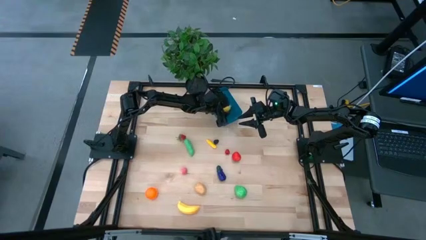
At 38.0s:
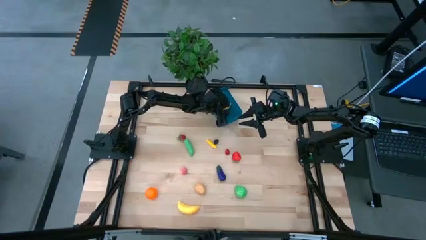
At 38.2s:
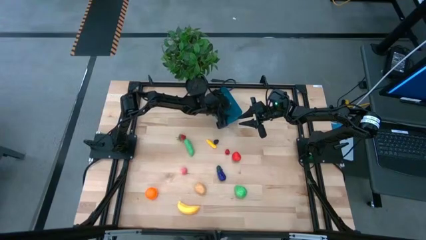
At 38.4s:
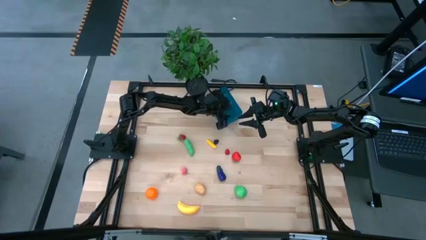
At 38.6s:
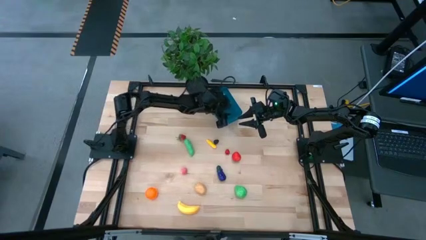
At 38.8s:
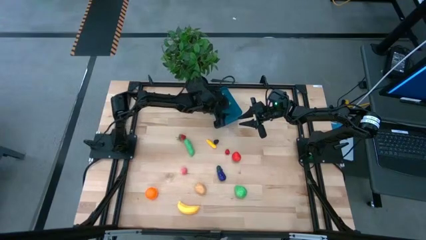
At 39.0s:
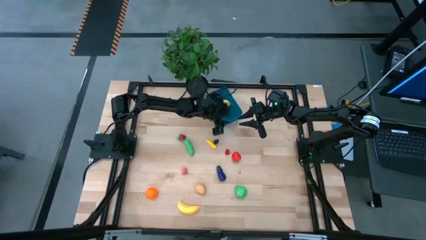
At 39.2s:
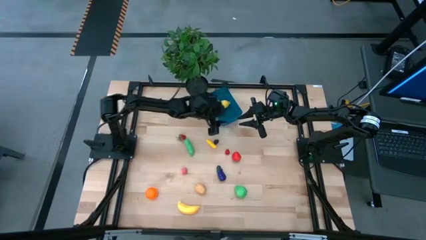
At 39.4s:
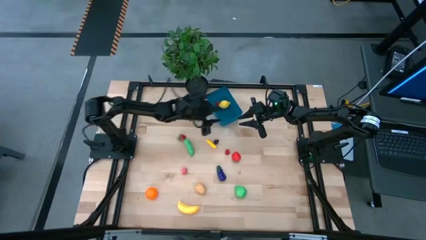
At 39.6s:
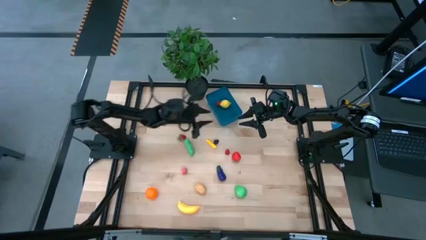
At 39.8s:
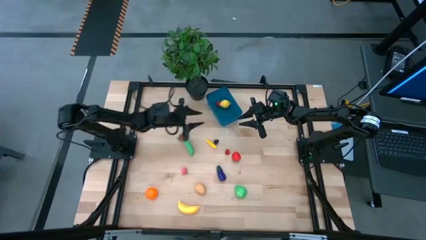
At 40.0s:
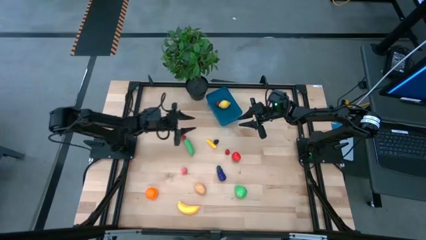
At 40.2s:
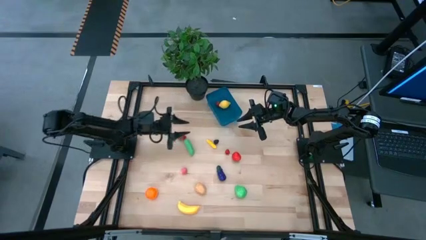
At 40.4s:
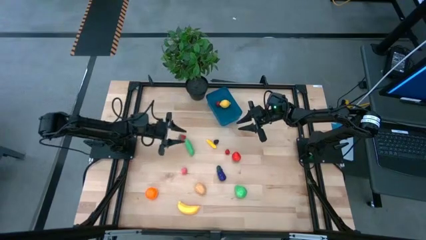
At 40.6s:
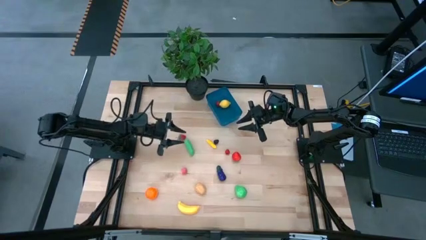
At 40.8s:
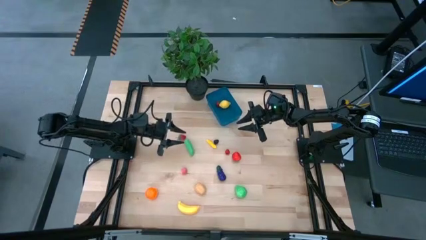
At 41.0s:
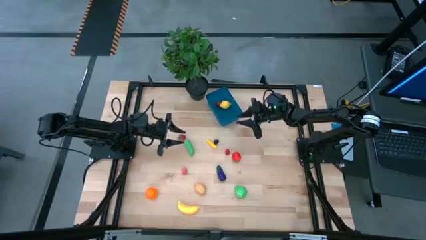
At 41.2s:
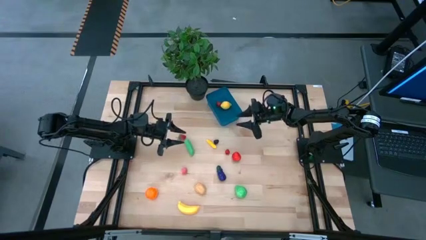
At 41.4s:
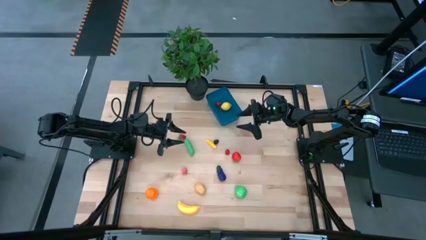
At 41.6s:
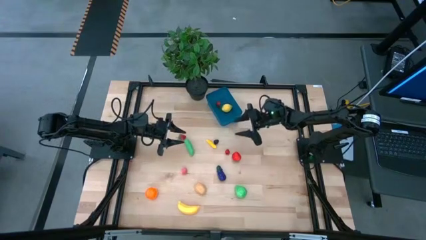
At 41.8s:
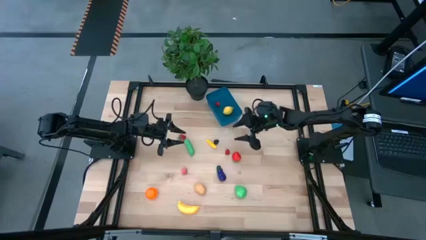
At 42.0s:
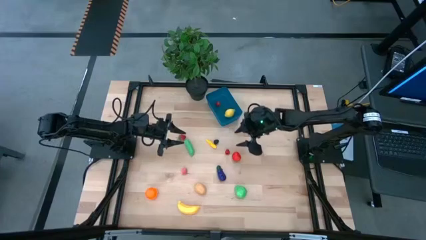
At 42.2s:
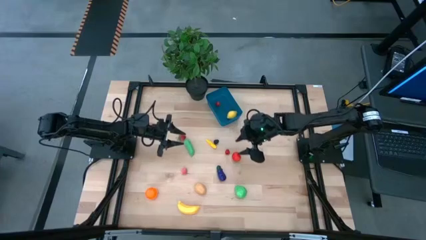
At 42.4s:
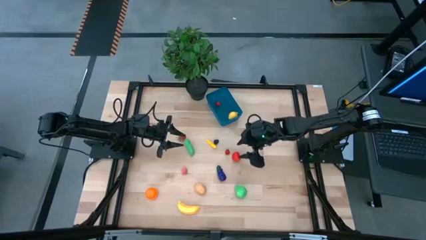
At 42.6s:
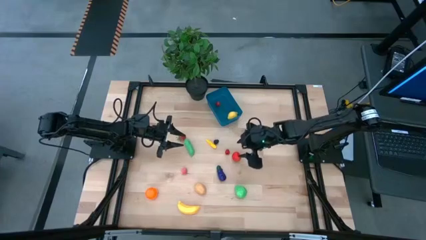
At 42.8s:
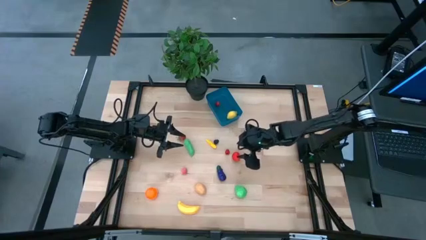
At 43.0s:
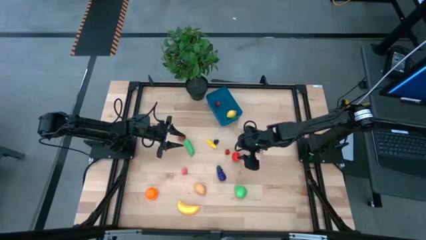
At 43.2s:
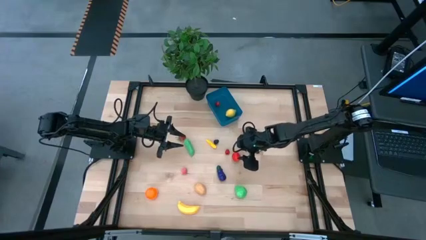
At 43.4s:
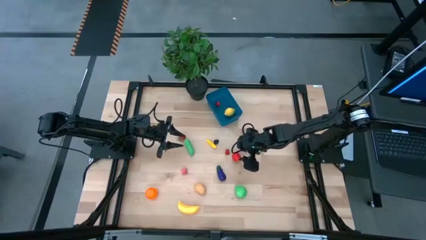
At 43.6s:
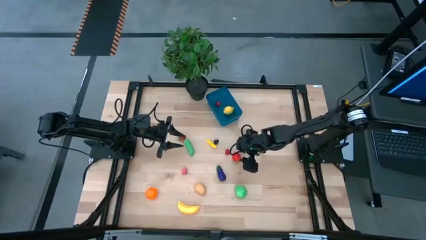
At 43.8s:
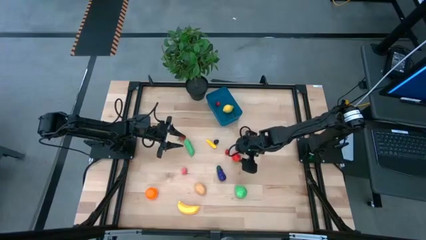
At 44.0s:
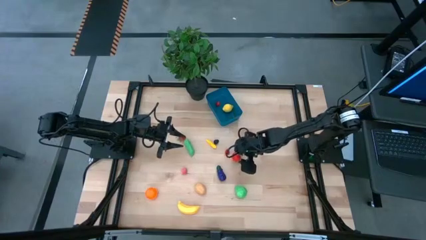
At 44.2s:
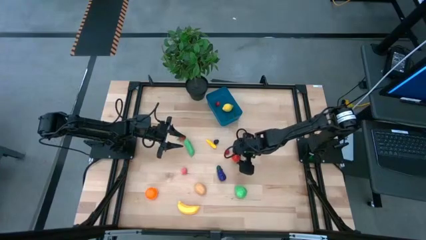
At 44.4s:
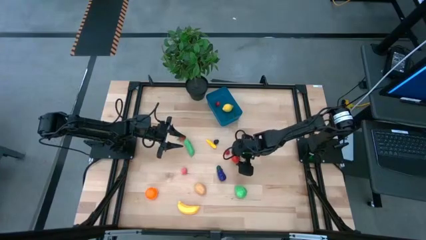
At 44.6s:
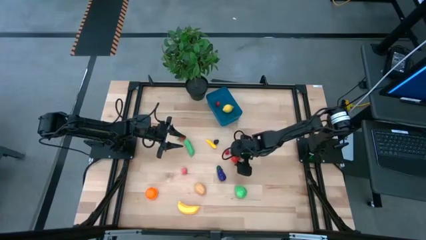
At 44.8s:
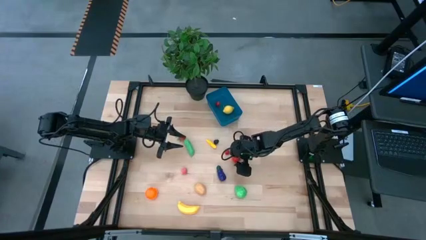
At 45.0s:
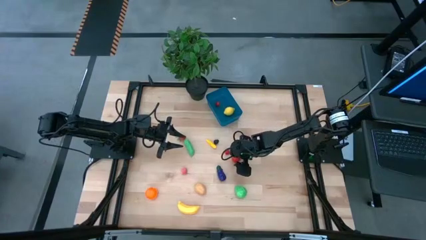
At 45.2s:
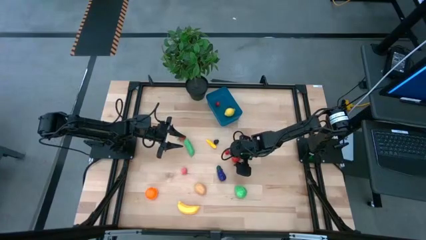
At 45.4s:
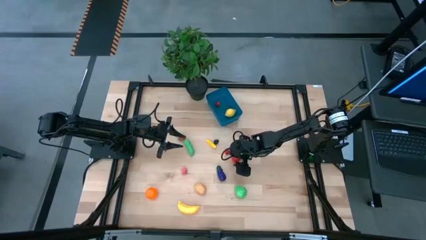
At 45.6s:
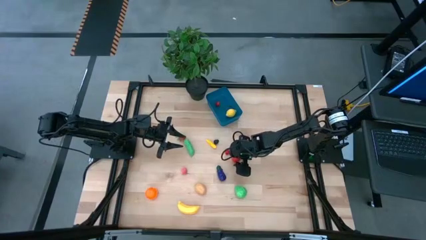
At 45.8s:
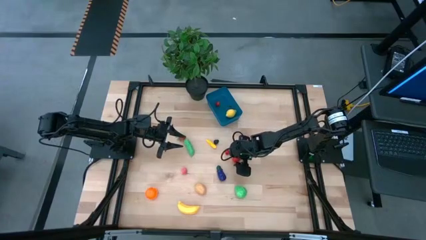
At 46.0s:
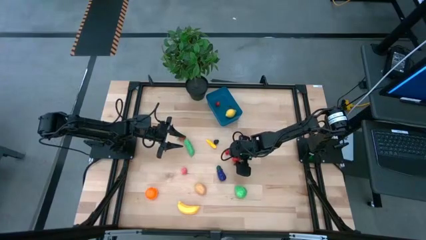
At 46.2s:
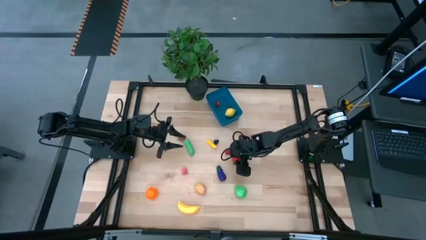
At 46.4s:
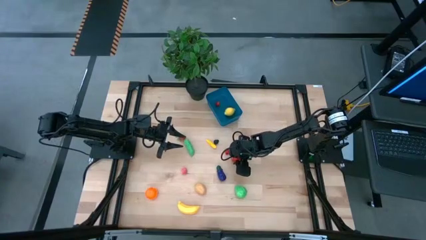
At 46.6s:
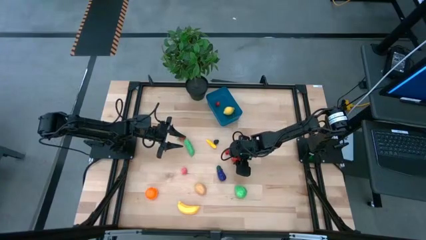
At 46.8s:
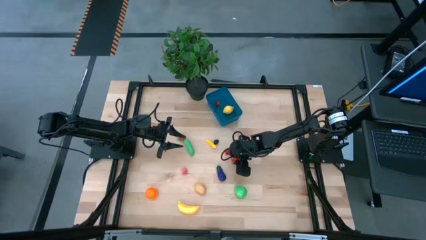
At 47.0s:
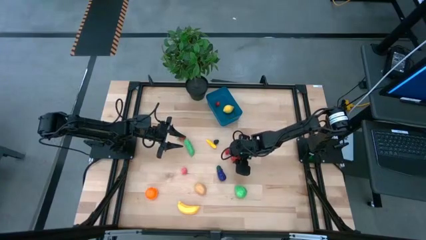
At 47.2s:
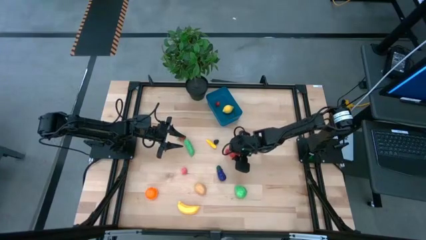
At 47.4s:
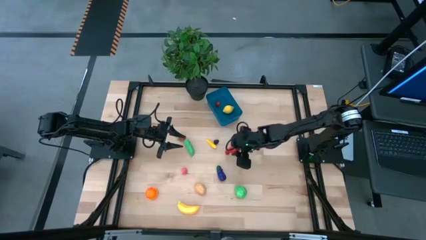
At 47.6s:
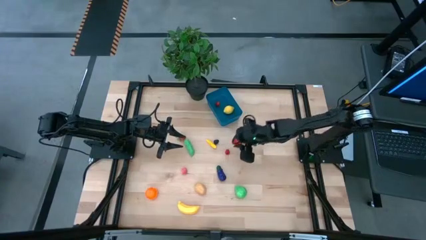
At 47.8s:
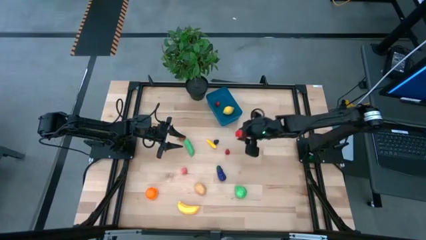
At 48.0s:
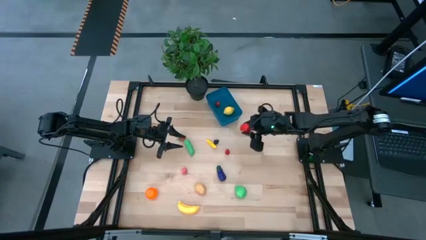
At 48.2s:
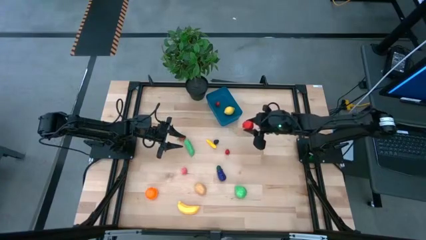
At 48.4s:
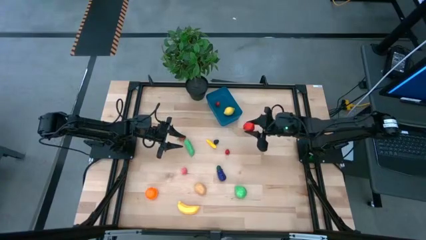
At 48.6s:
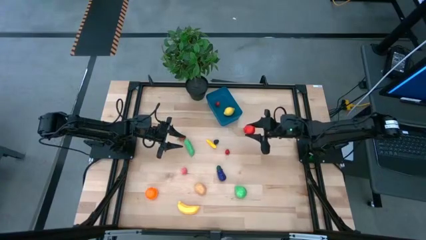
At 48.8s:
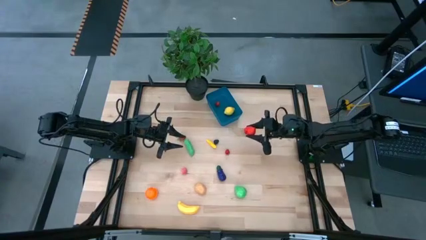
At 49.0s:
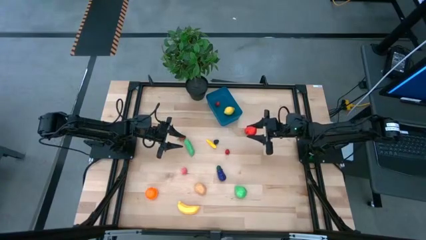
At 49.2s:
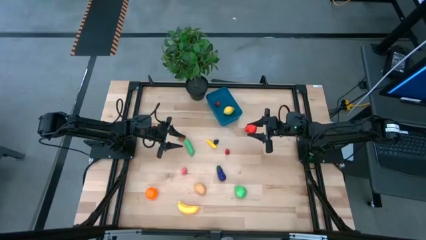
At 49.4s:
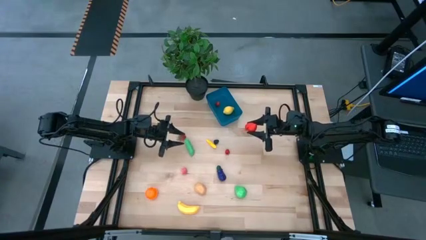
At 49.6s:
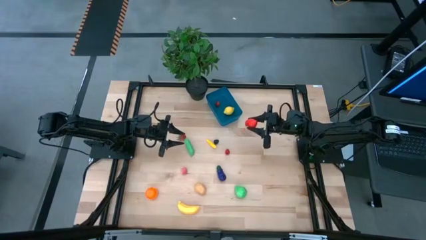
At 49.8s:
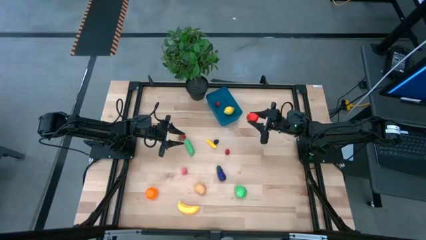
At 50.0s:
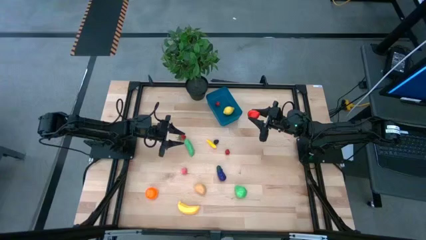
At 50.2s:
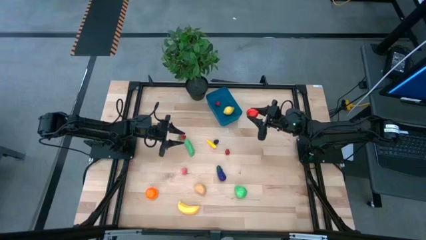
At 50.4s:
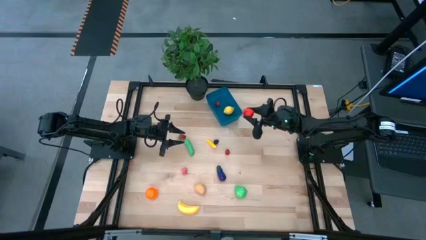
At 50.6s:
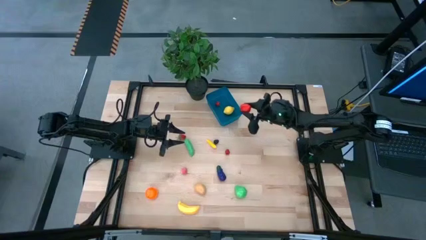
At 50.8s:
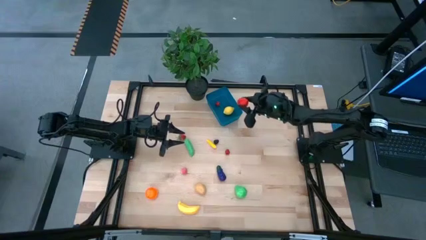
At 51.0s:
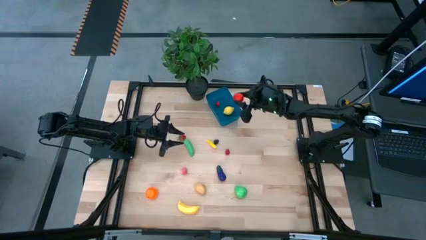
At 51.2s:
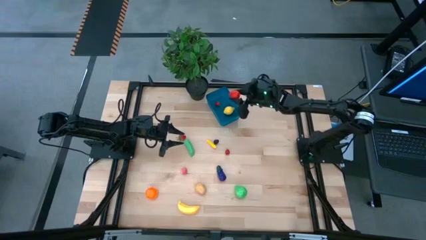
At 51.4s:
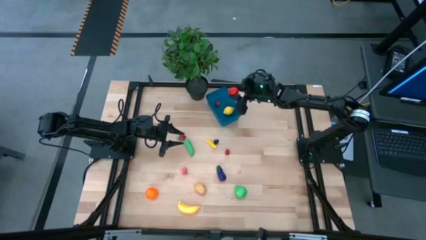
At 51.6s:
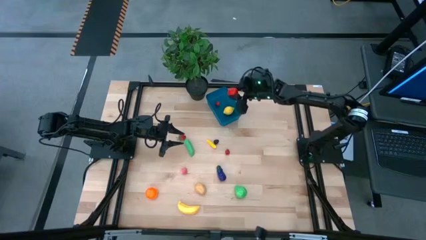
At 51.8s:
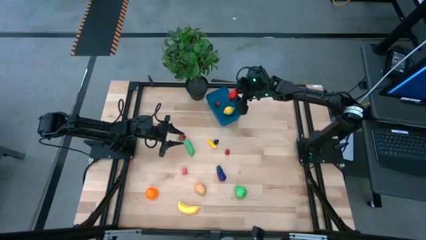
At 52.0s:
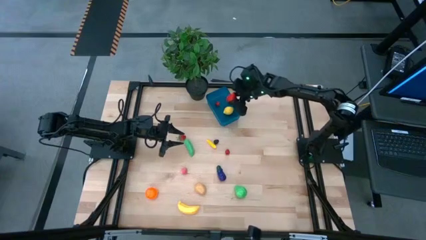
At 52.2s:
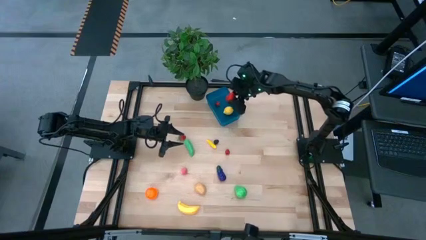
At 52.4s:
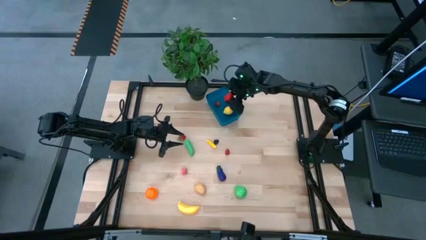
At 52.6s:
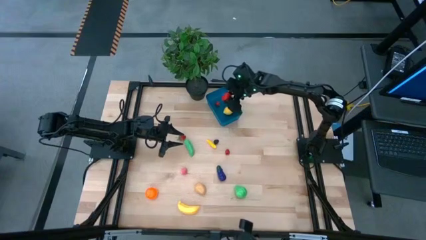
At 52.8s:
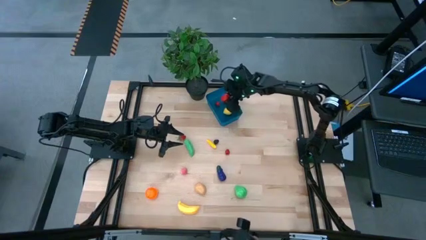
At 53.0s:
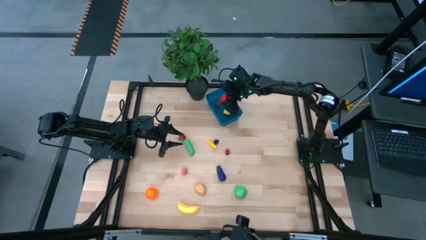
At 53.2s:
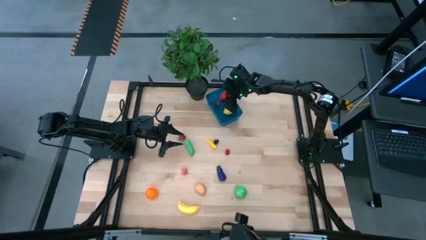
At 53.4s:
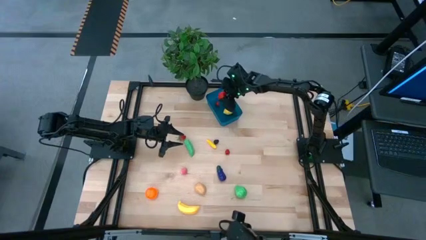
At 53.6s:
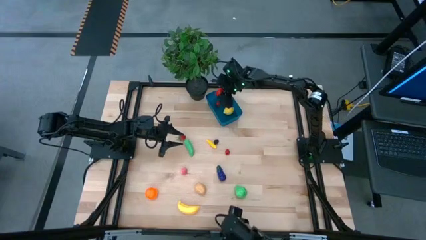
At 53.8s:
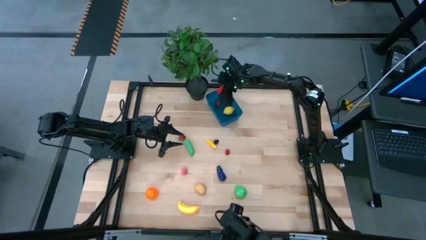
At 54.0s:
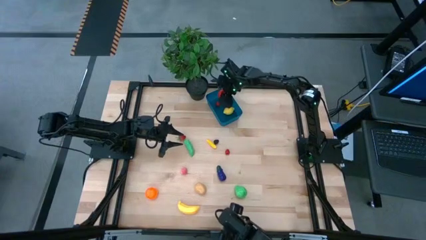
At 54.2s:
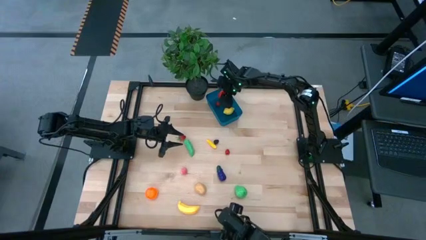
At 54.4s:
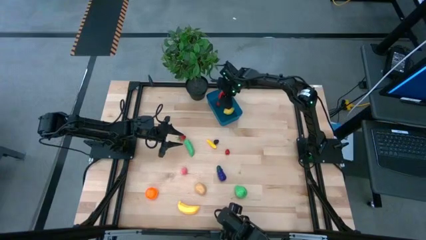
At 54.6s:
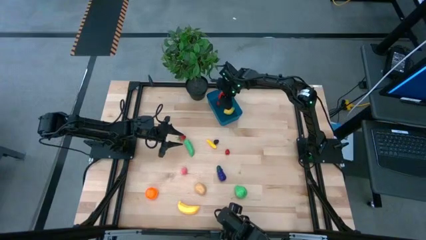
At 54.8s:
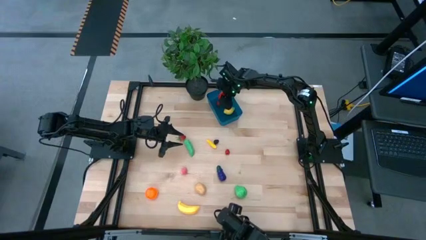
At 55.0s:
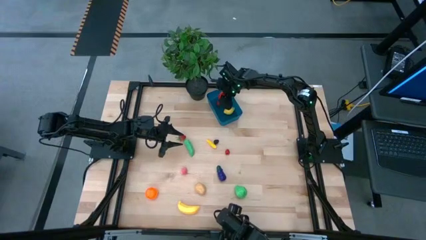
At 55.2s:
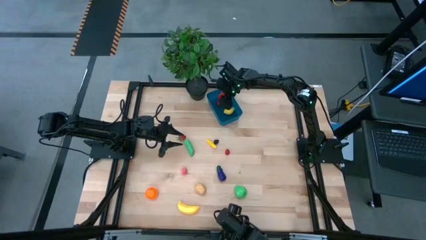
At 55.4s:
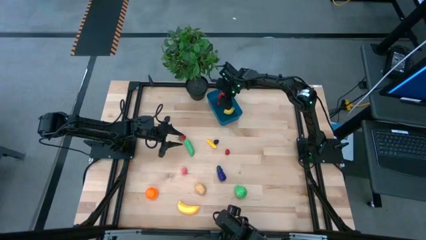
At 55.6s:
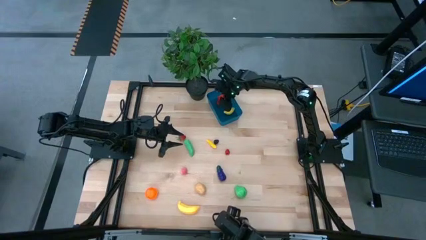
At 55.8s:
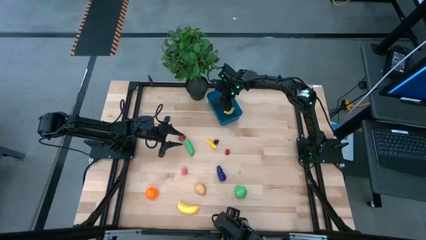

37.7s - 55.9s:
Task: Pick and placing Produce into tupperware
Put the right strawberry into the blue bin
